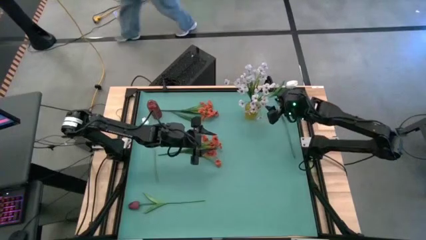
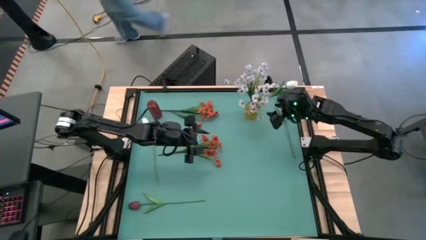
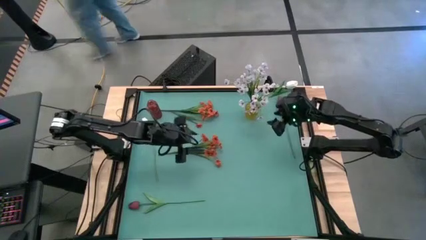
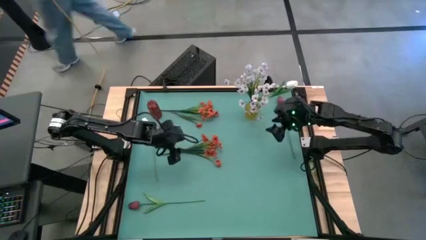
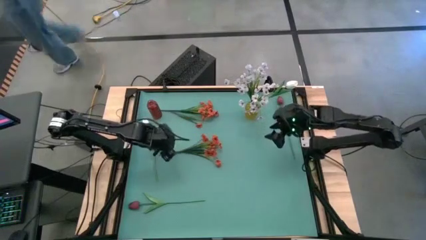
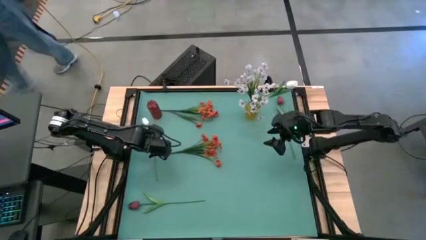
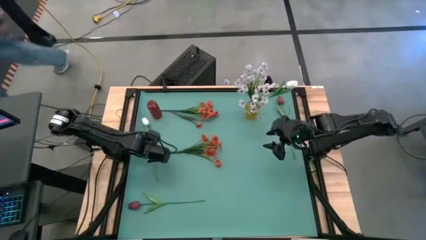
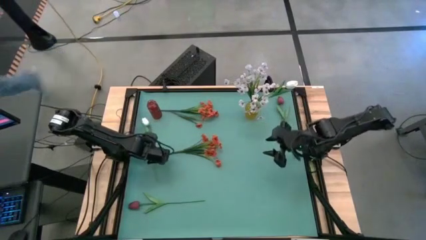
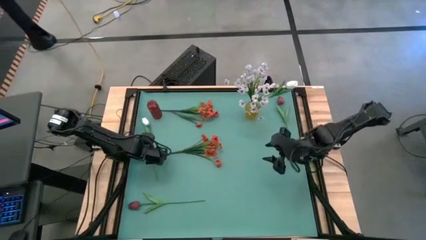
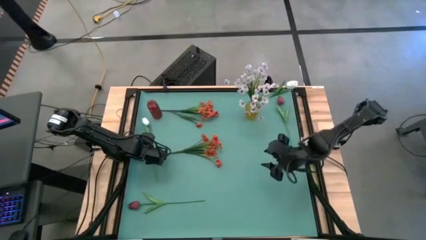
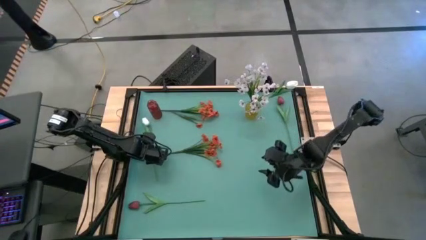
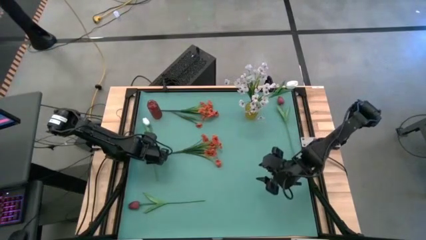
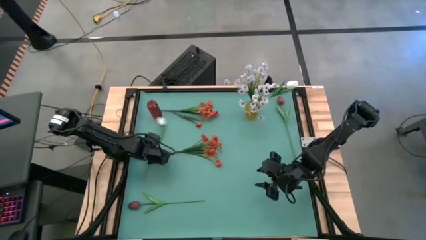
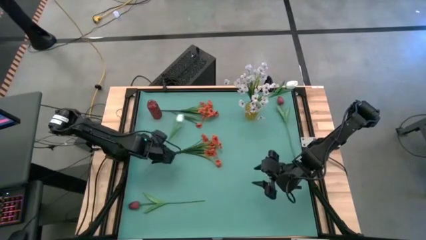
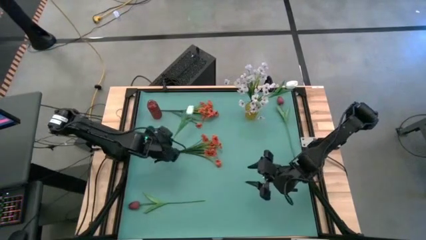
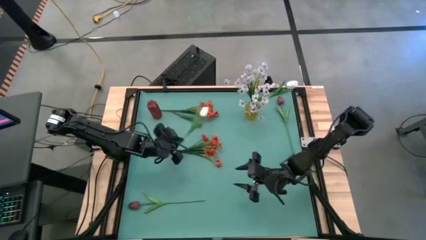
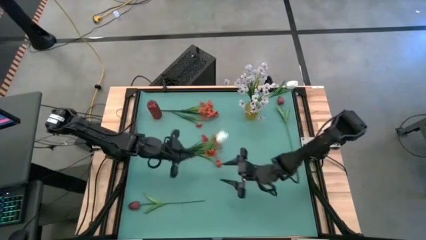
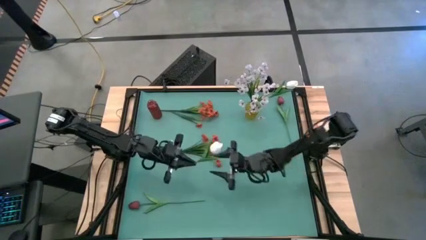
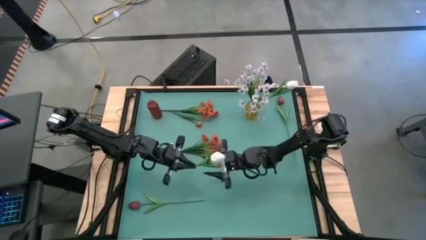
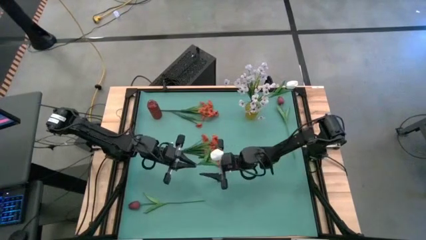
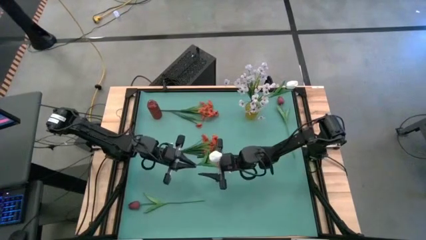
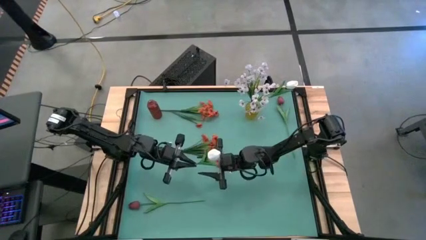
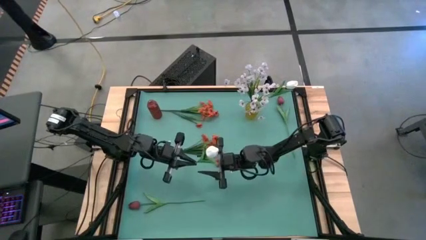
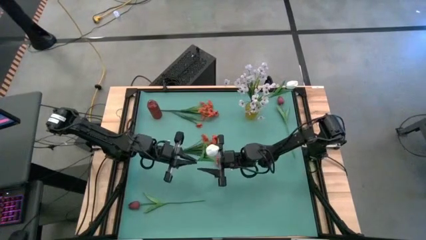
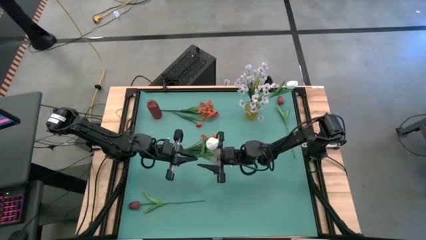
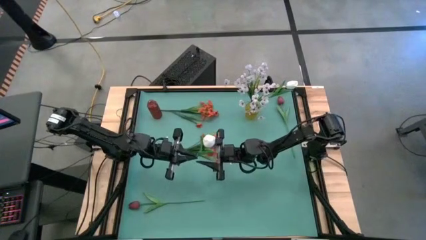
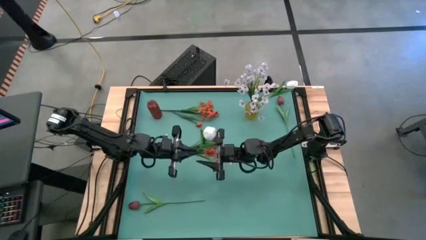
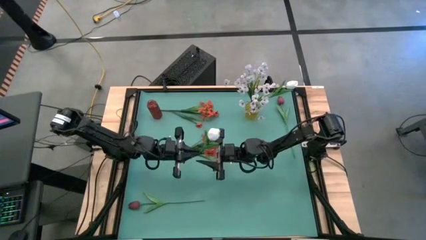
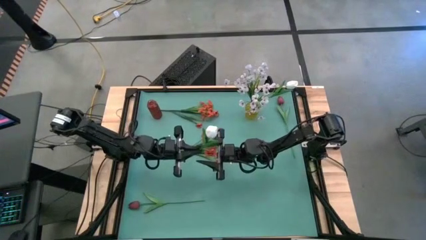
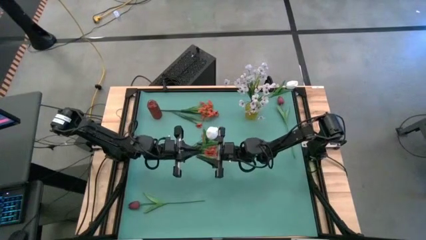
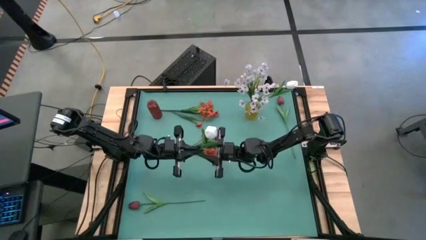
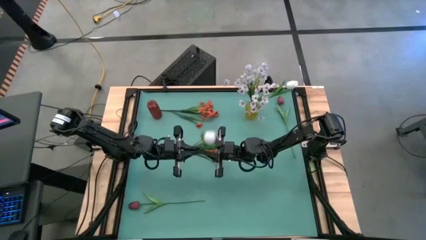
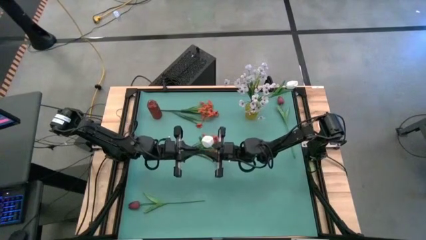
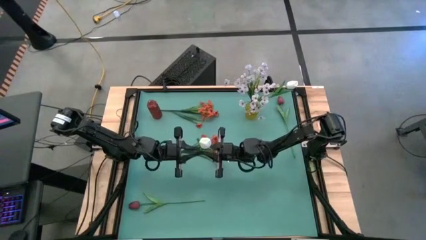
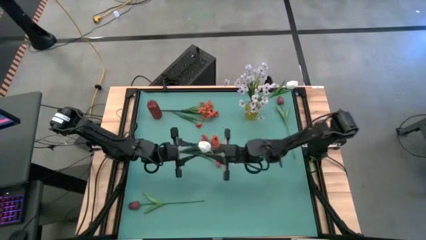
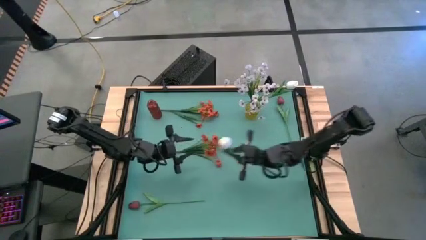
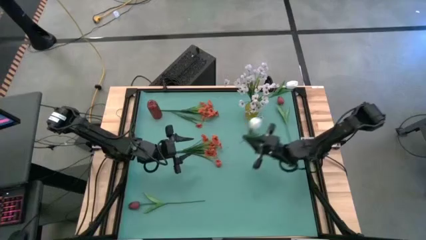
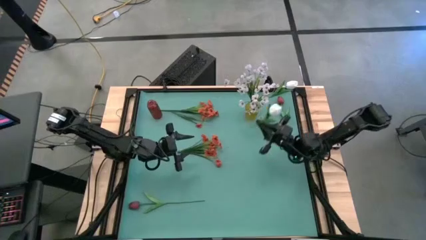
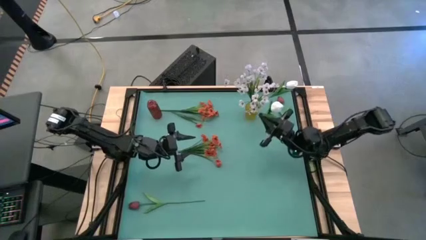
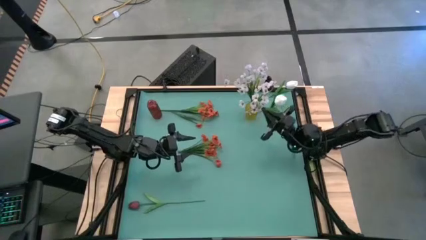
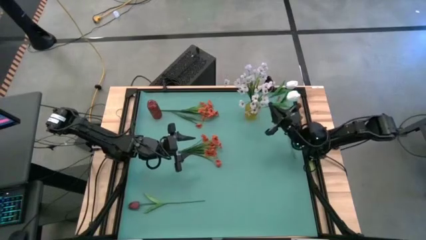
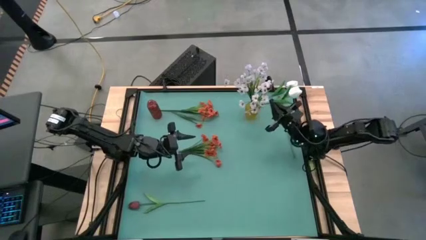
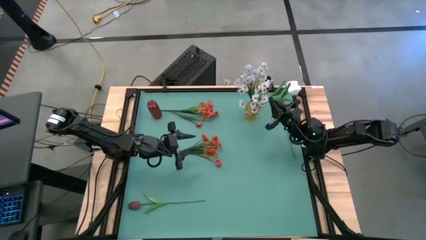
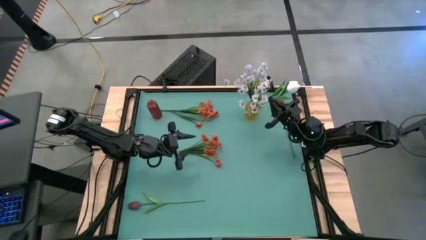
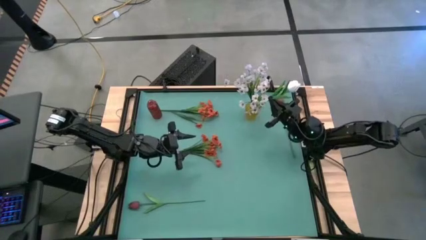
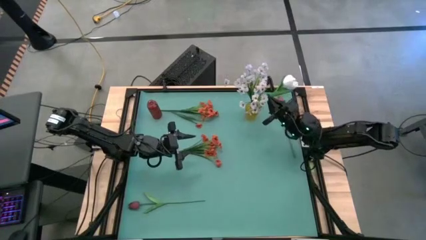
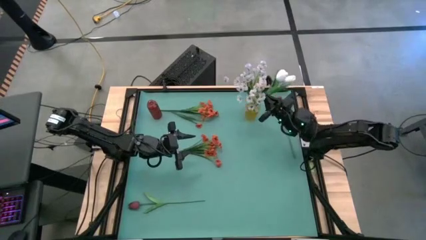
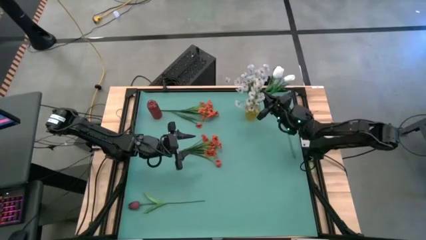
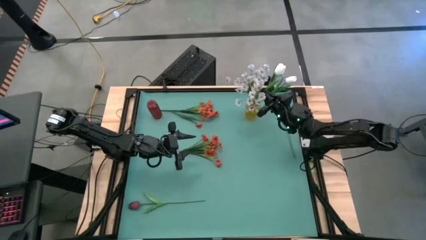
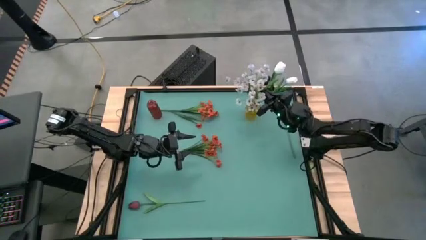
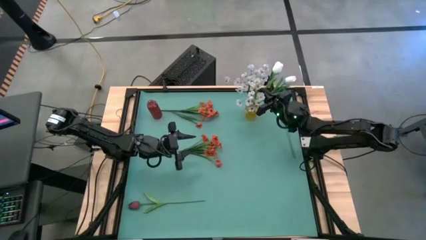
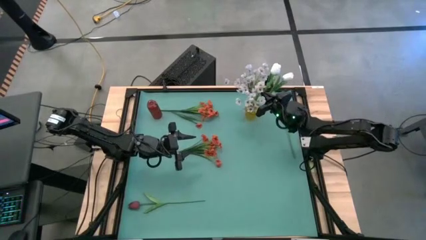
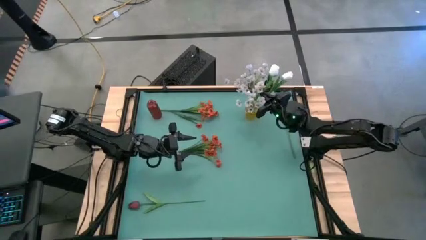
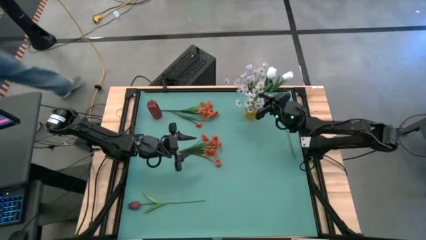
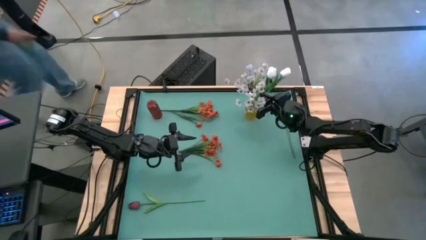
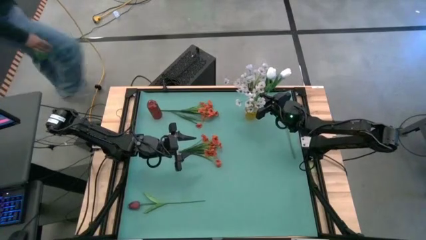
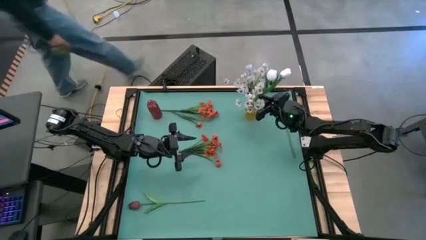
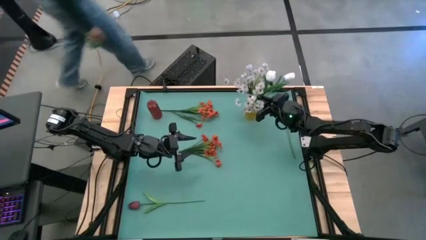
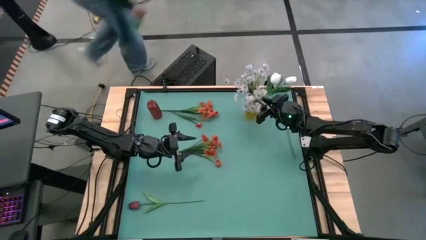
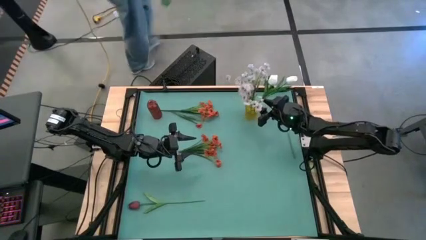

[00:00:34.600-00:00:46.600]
Task: Sort flowers into vase by color
Put the white tulip into the yellow vase

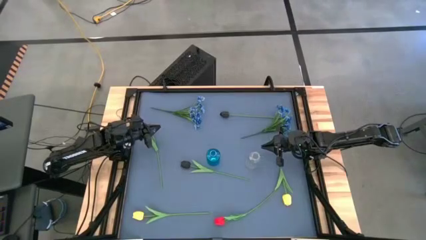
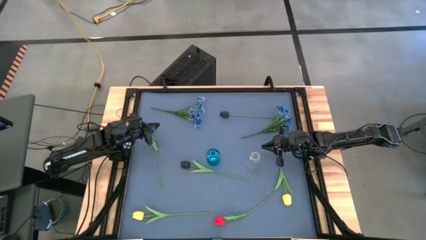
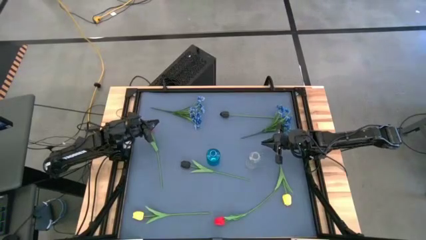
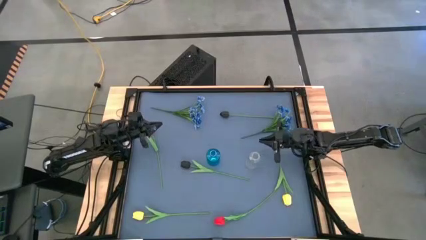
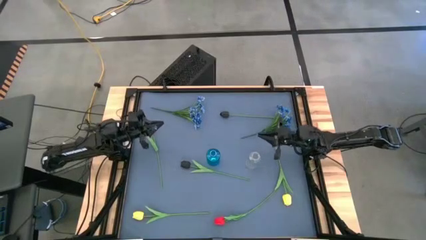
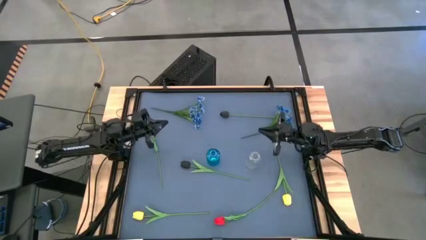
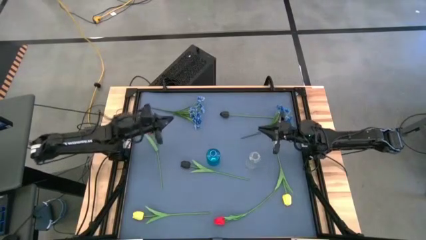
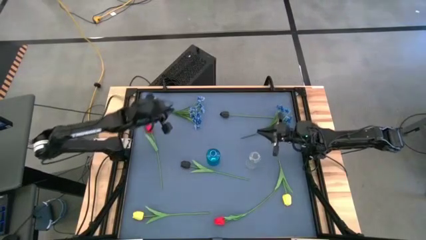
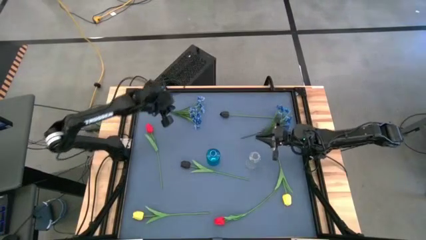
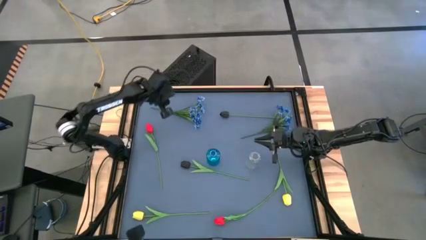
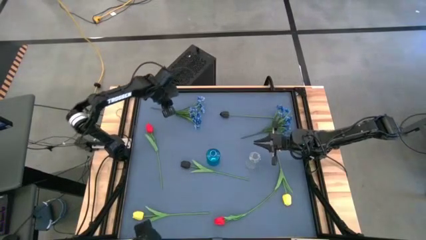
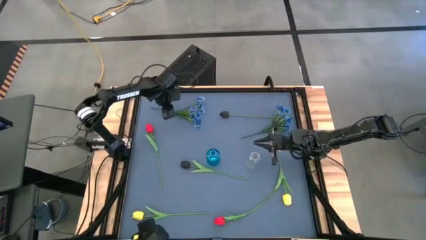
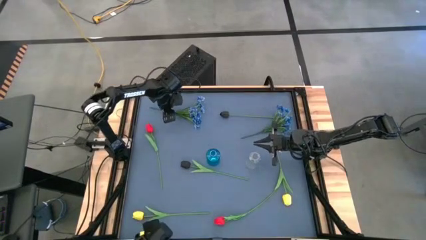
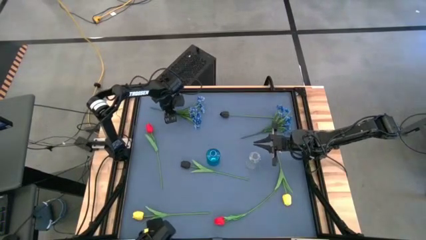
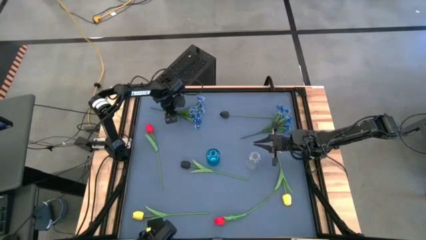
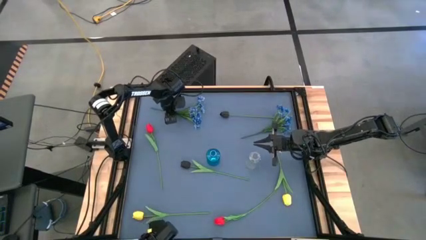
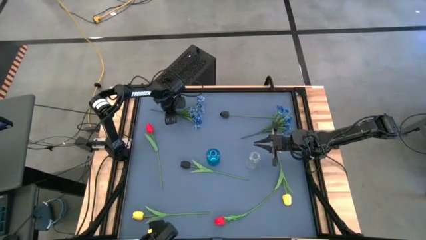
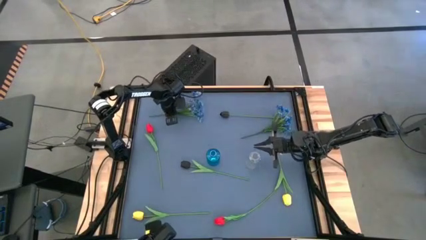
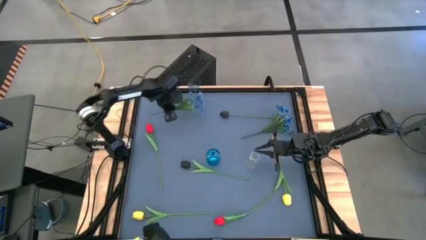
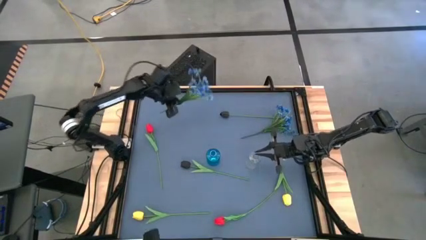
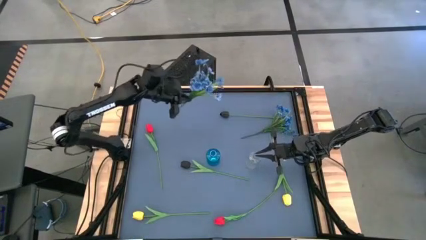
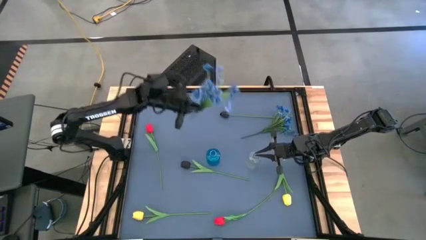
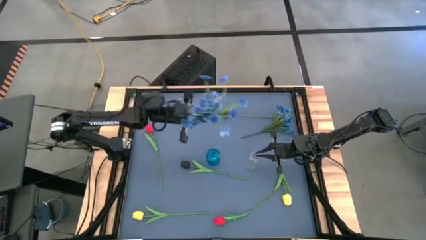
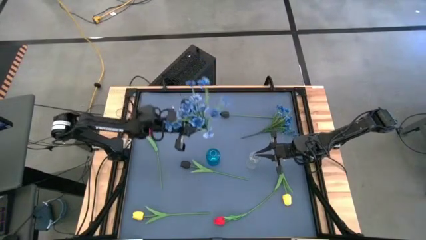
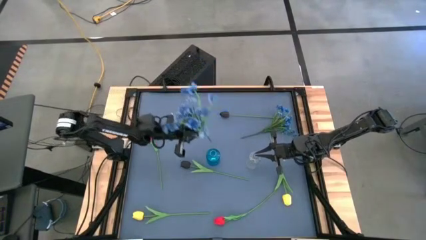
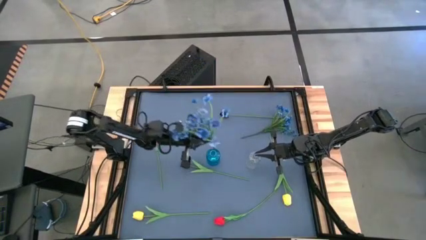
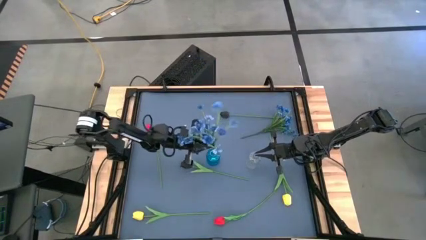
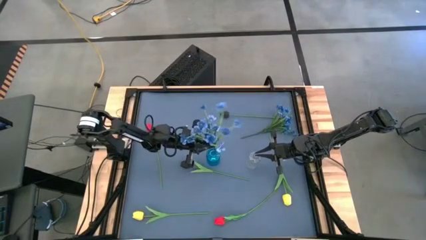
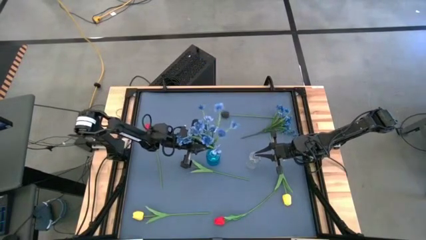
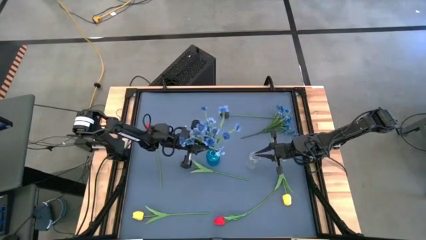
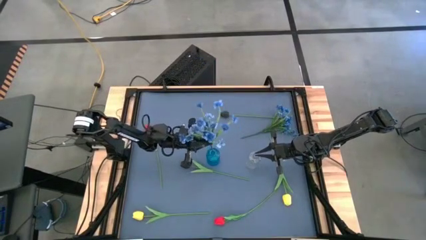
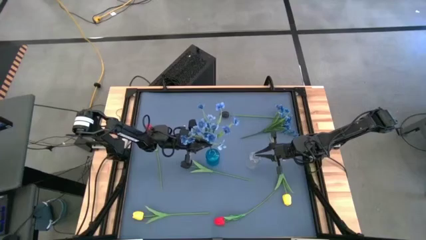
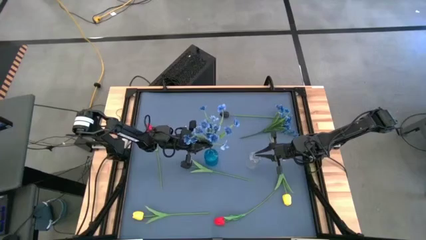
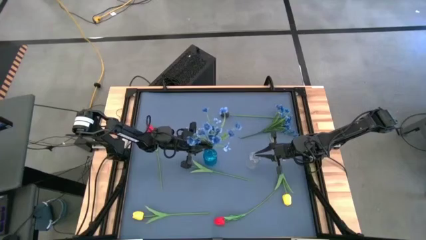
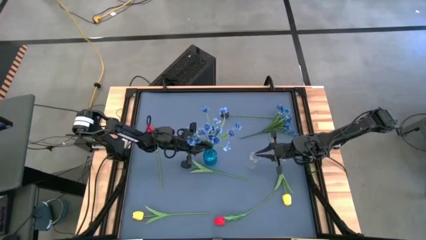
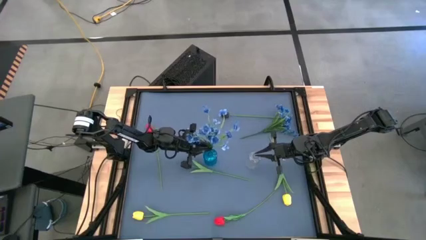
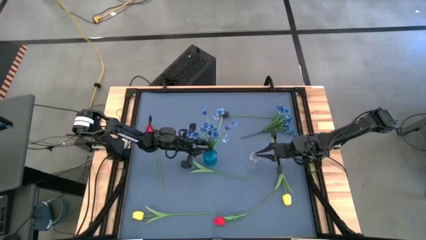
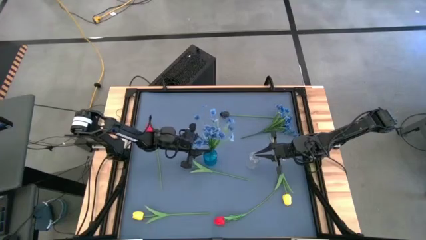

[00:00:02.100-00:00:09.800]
Task: Sort flowers into vase by color
Put the left blue flowers into the blue flower vase
